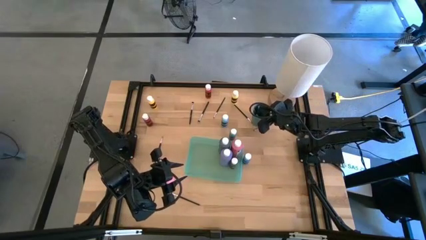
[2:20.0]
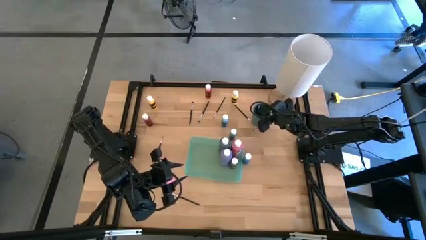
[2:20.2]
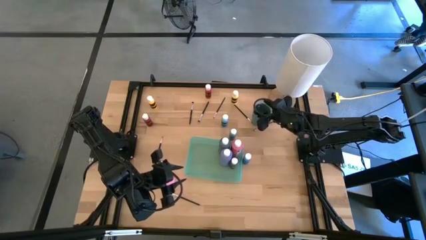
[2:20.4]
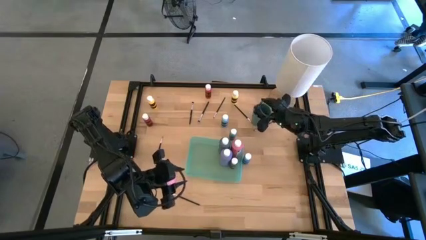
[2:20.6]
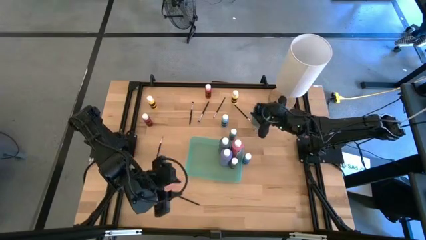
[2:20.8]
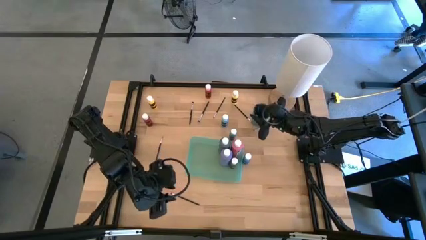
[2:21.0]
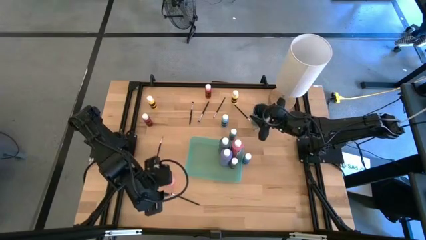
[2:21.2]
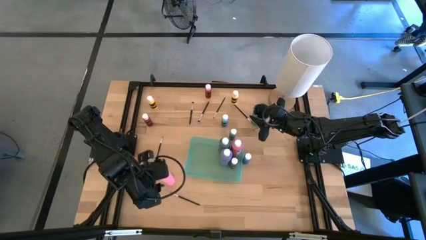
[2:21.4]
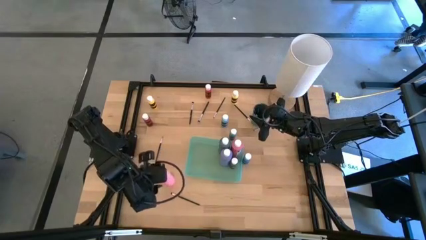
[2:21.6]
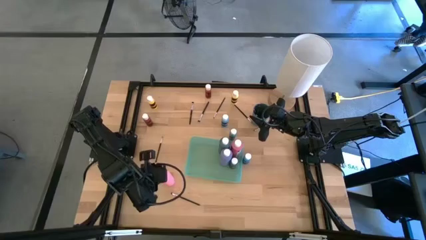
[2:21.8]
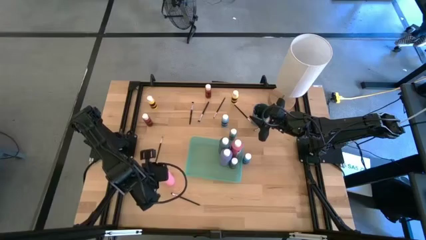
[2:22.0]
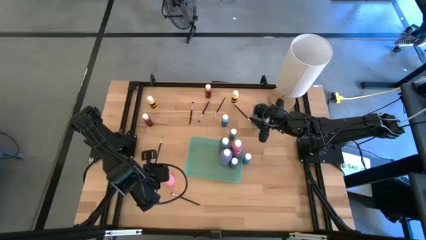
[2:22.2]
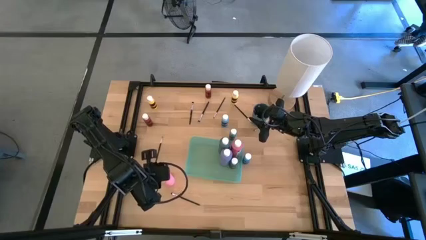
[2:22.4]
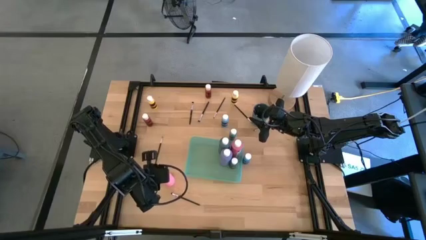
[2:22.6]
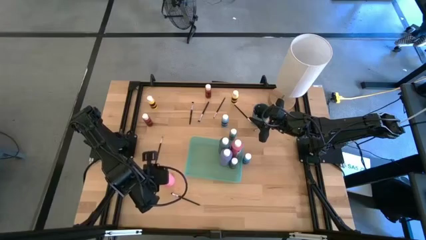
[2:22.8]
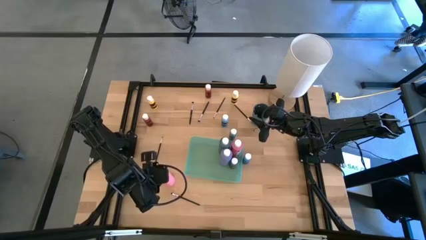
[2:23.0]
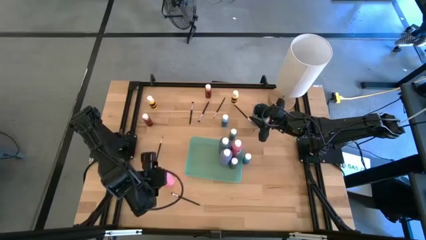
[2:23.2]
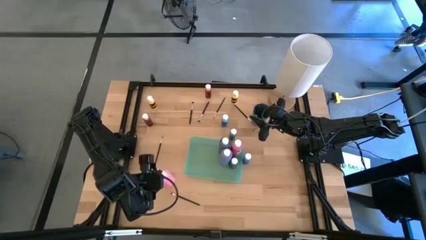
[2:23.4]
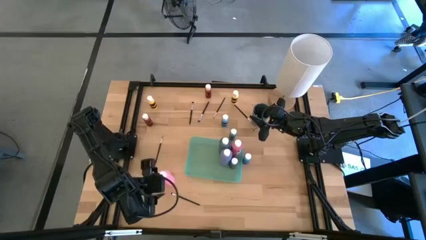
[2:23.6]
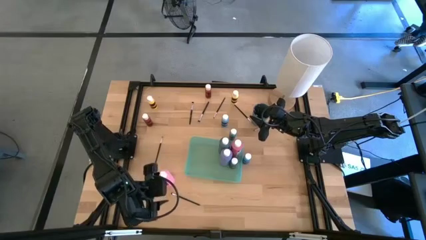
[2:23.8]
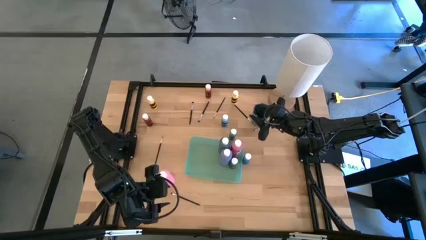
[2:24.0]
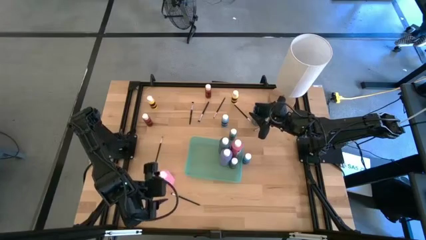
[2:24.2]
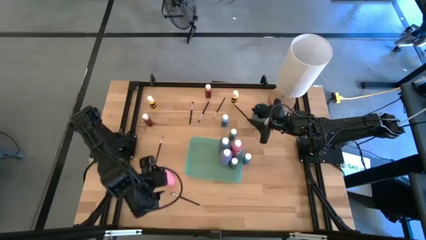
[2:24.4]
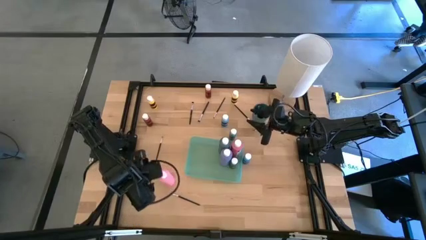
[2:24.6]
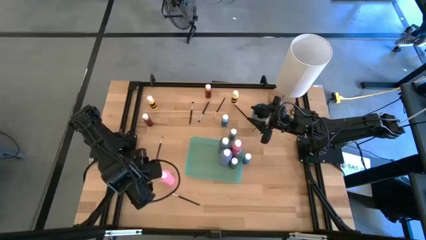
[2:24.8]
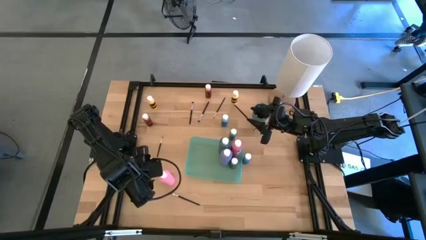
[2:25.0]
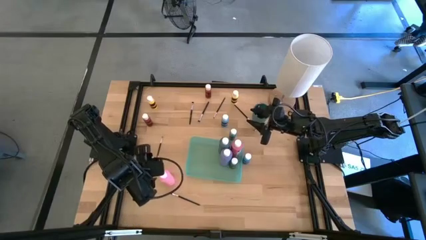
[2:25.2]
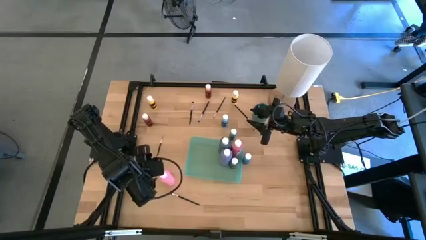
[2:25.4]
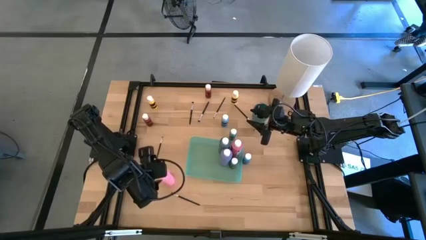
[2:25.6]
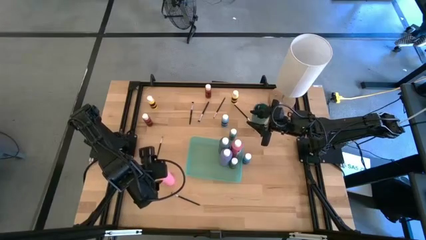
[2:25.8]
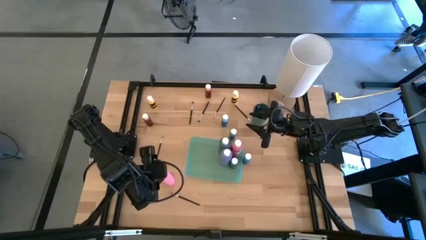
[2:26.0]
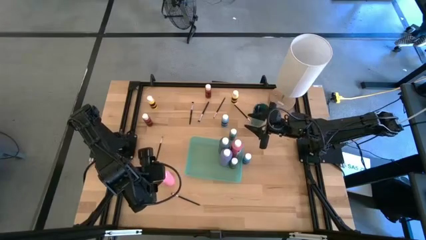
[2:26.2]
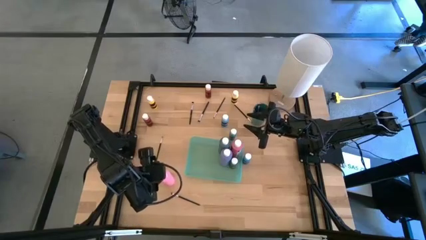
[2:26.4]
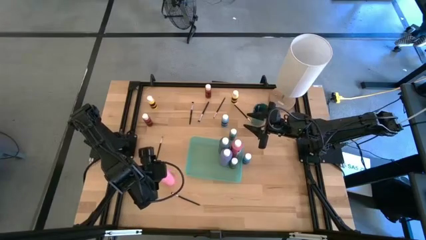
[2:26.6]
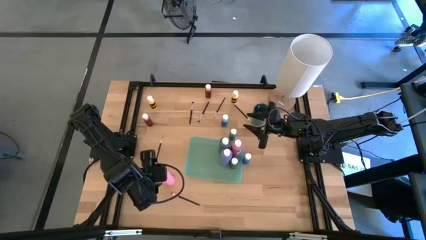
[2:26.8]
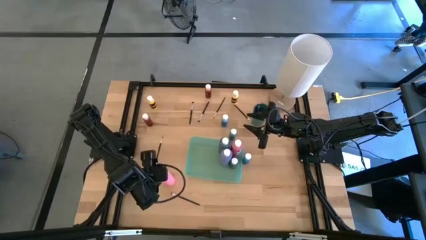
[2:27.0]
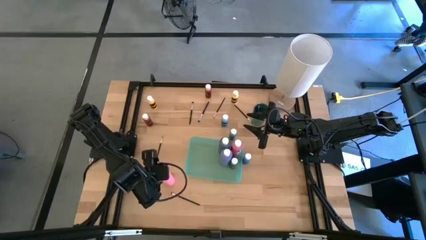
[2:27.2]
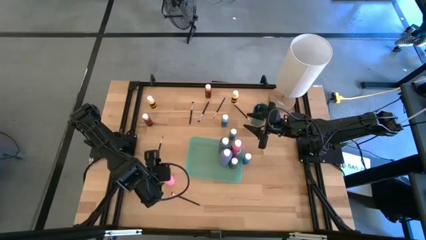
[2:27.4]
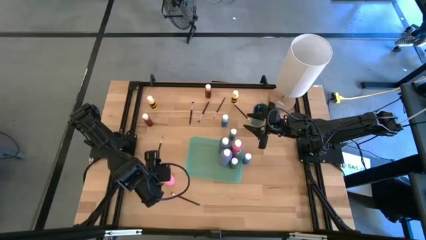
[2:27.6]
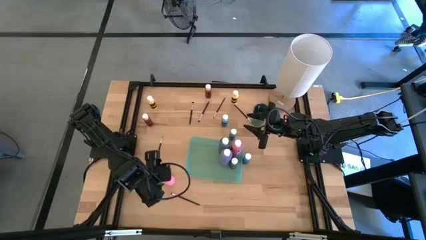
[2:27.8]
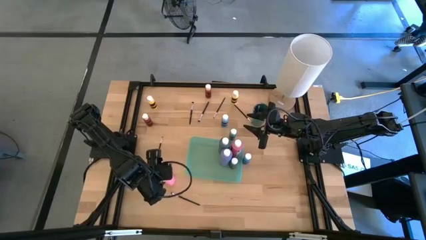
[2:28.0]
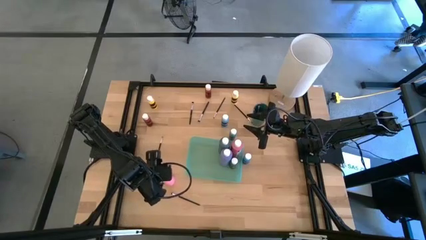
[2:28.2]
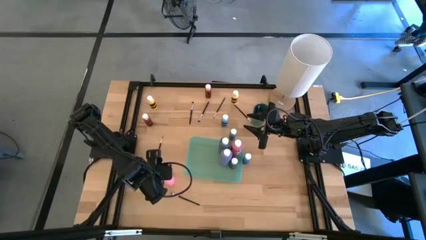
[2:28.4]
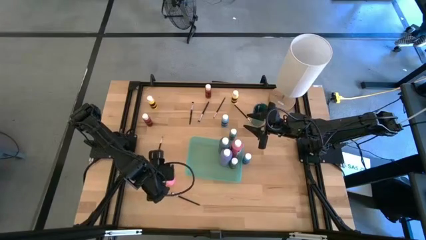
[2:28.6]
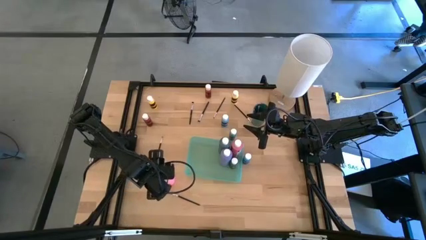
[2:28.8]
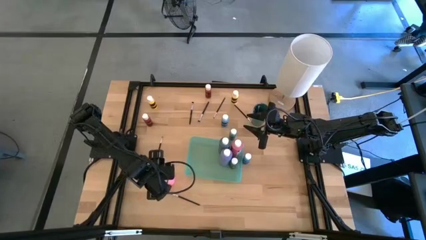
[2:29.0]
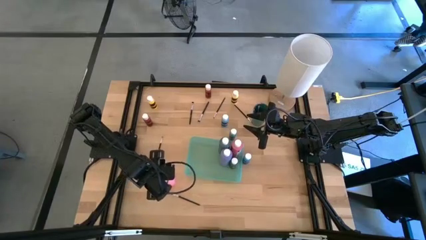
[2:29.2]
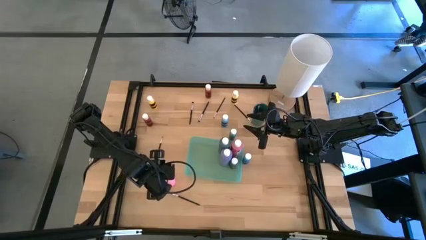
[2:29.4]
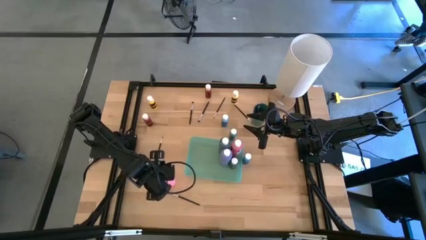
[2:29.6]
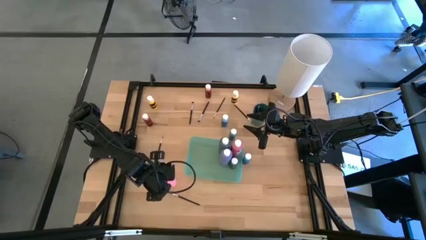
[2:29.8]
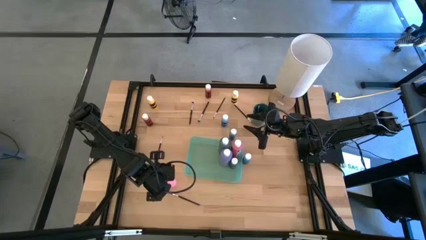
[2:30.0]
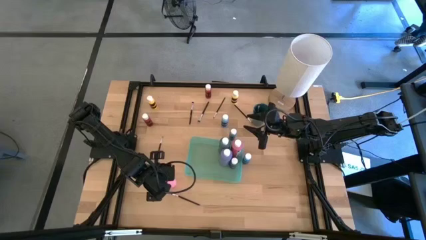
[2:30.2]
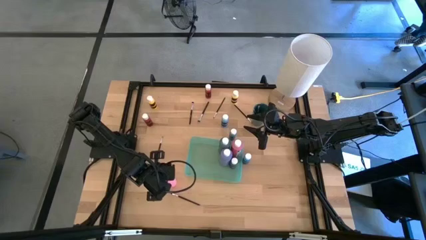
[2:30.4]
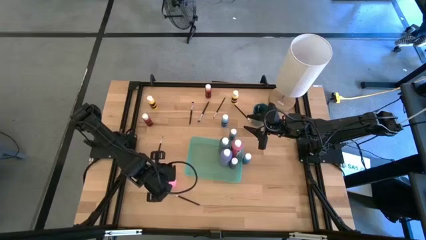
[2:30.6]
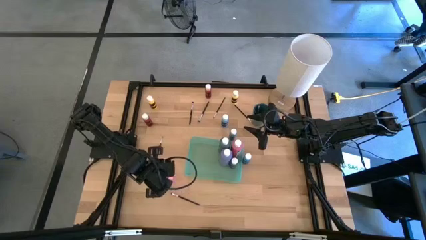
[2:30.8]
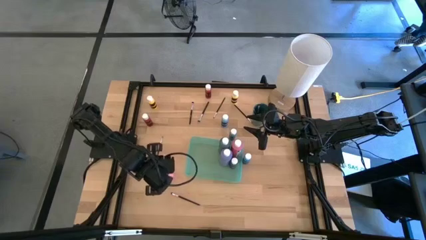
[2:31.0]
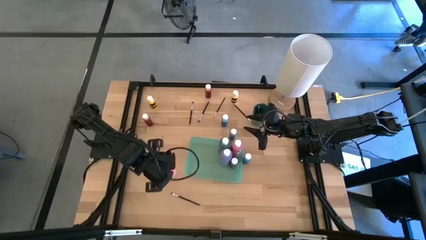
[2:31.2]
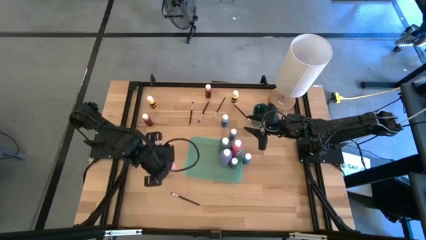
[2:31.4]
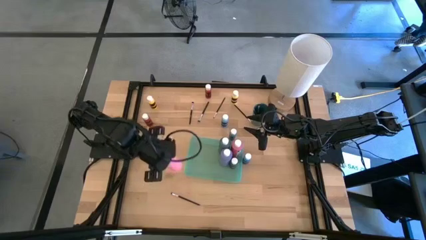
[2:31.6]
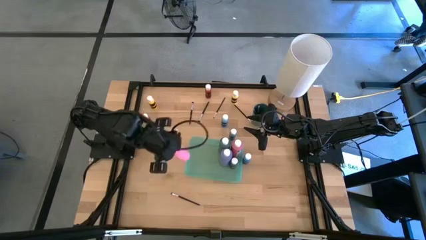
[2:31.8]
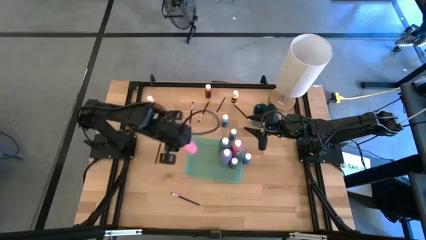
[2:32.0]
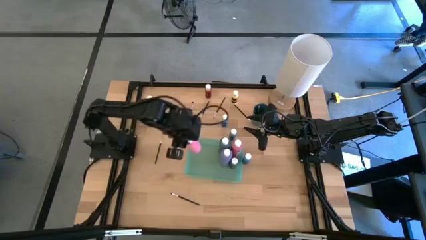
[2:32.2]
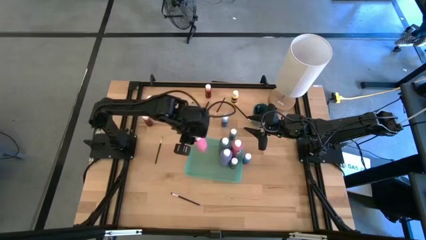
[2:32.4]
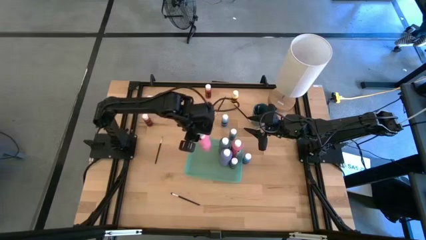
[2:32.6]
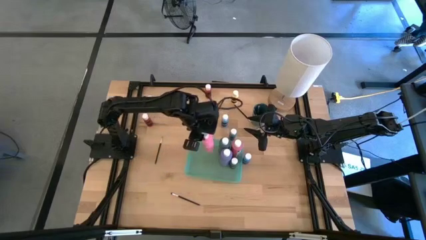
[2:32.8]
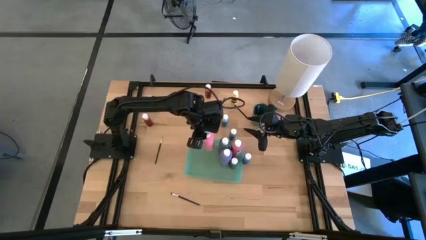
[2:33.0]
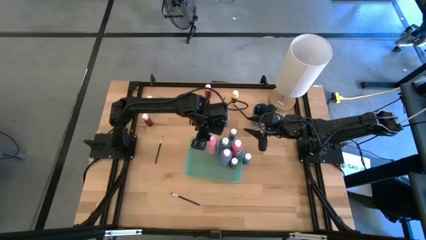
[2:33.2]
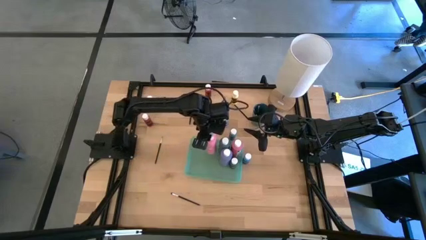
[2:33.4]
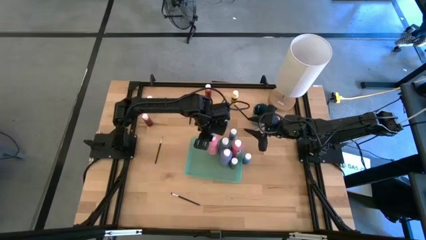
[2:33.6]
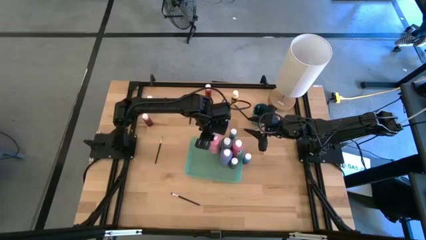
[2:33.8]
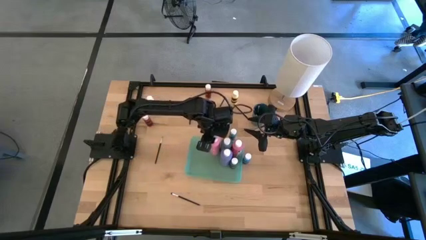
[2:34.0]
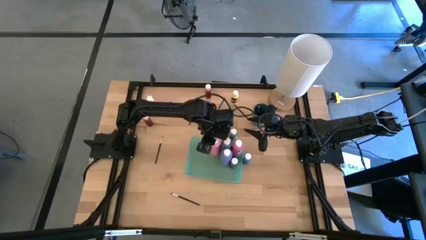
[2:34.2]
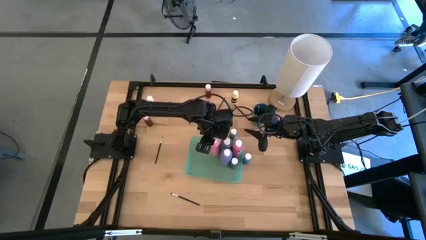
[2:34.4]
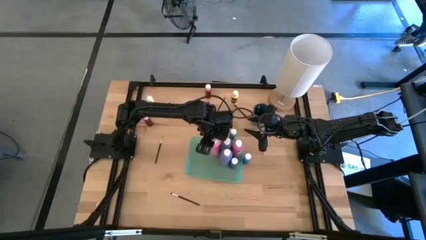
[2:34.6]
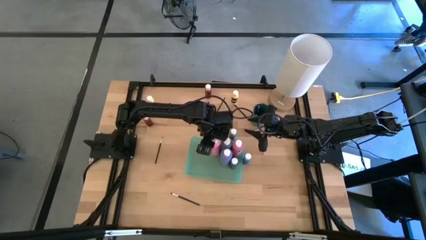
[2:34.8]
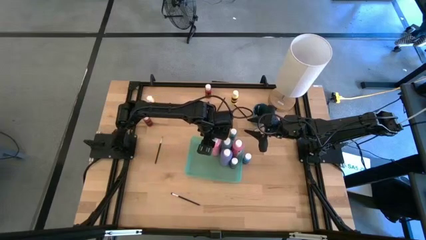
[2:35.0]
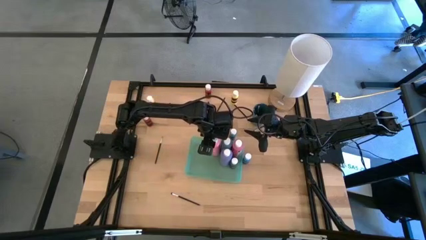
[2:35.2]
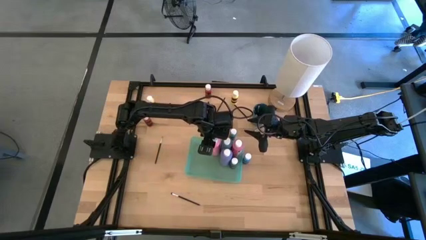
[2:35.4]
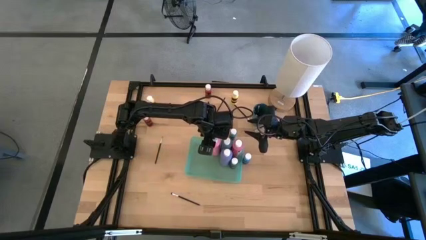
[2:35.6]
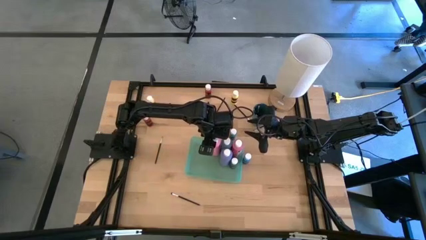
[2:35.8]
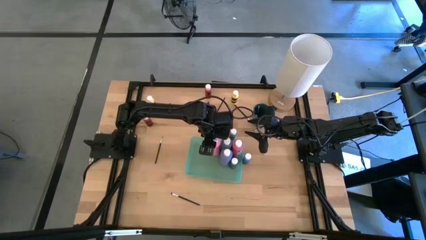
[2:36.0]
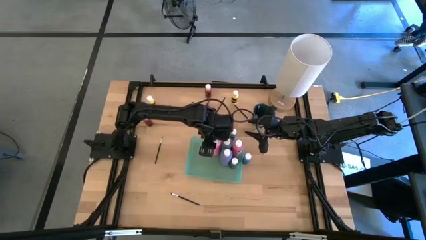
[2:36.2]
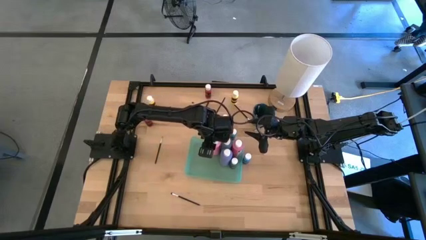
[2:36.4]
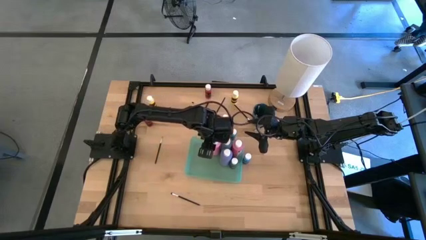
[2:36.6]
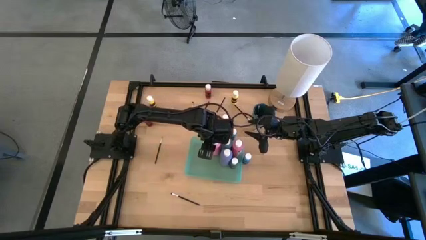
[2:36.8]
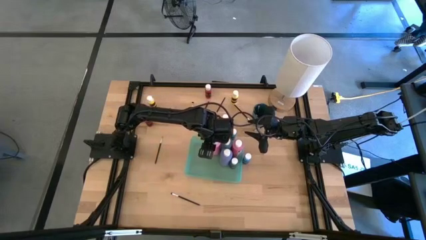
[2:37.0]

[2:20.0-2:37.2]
Task: Pick & Place Paint Supplies
Put the pink paint bottle into the light green bin
